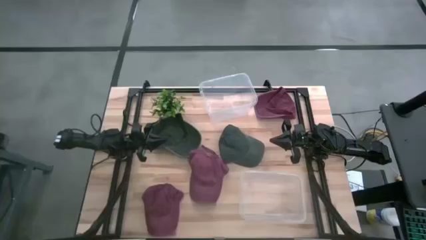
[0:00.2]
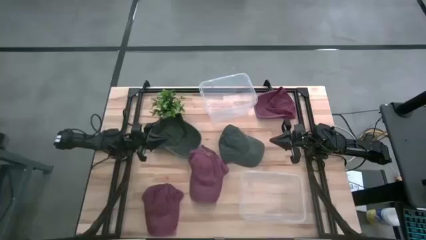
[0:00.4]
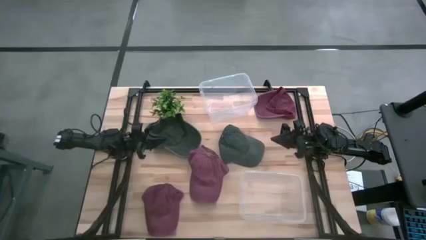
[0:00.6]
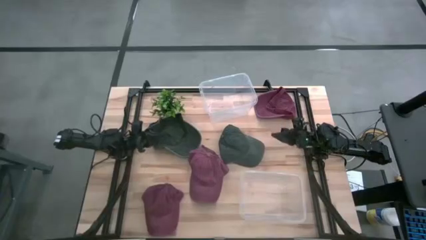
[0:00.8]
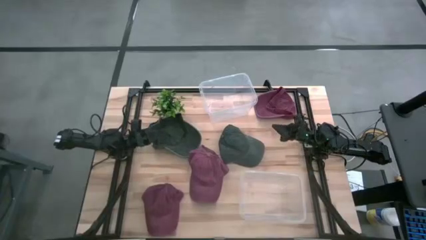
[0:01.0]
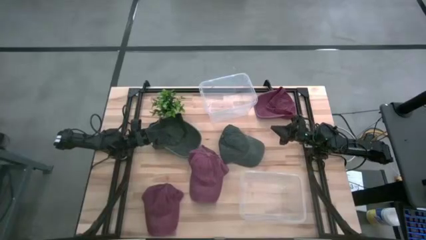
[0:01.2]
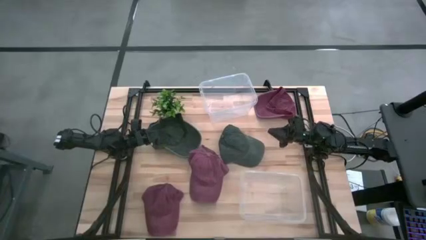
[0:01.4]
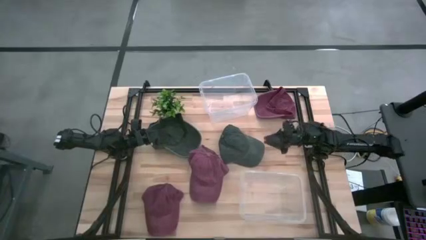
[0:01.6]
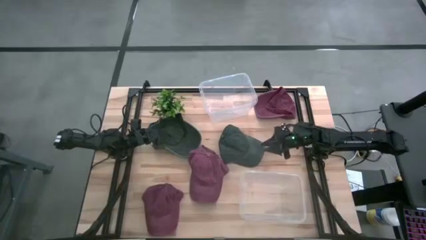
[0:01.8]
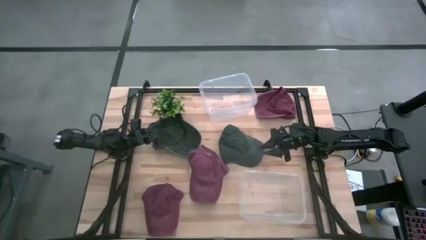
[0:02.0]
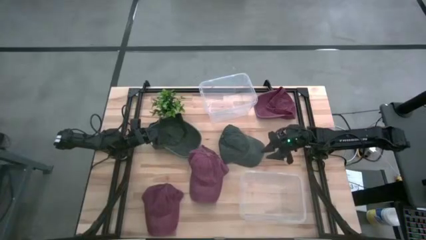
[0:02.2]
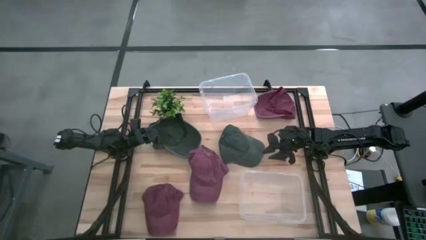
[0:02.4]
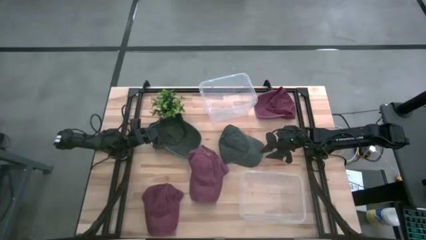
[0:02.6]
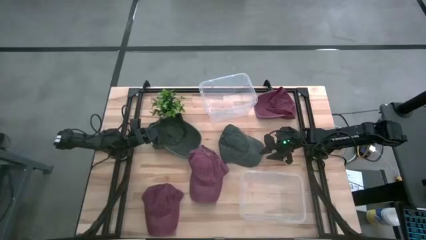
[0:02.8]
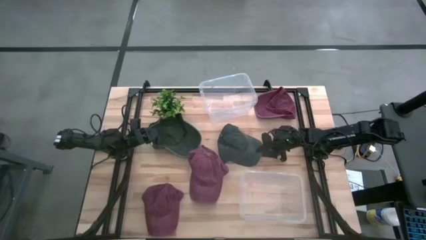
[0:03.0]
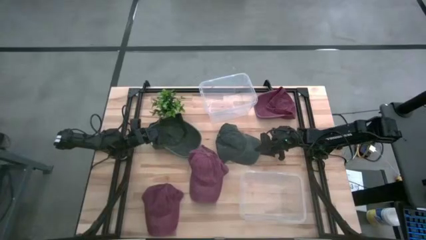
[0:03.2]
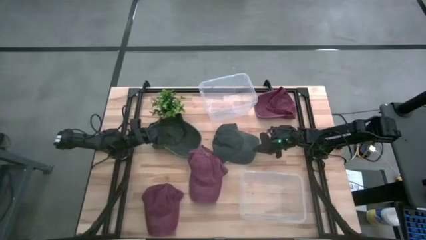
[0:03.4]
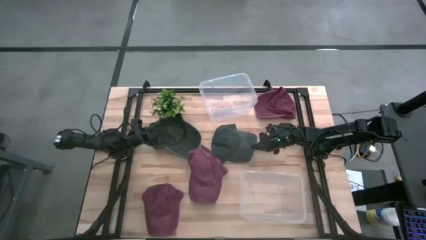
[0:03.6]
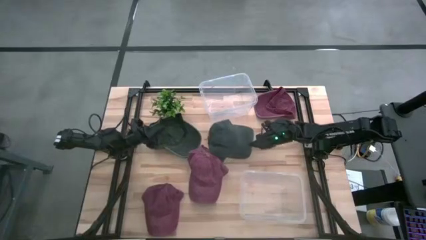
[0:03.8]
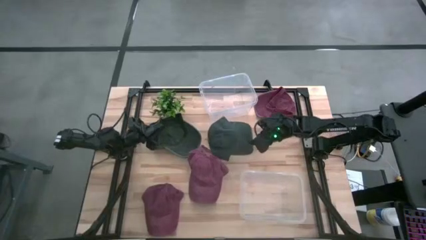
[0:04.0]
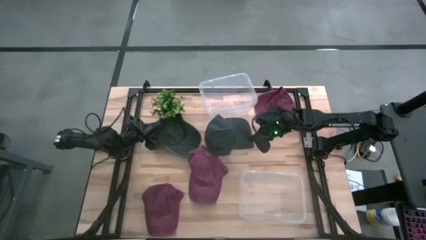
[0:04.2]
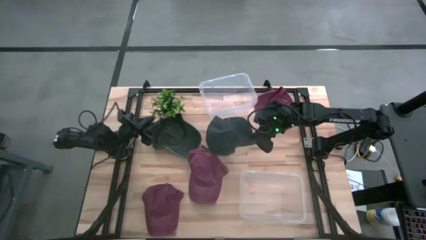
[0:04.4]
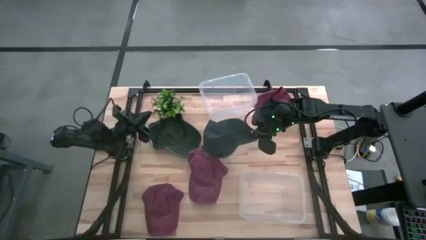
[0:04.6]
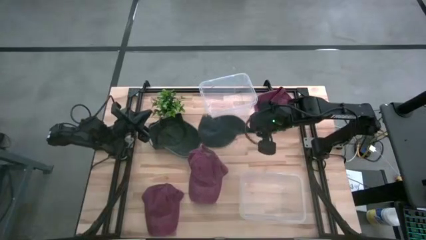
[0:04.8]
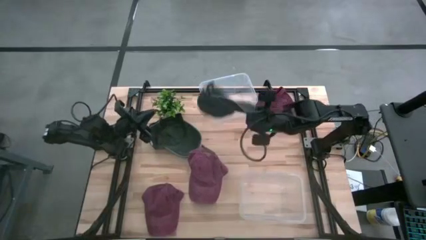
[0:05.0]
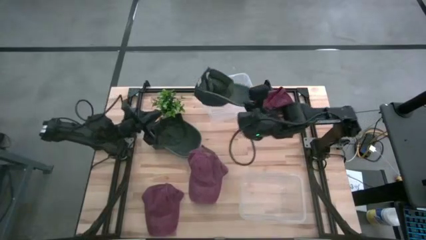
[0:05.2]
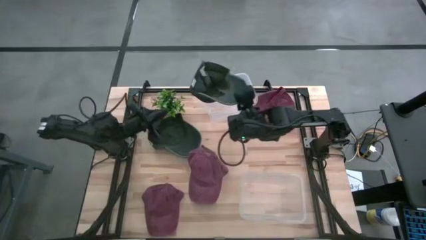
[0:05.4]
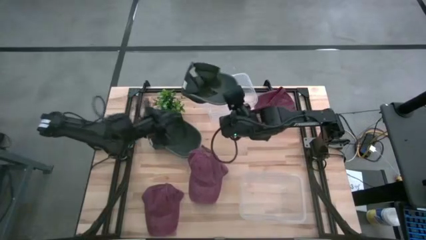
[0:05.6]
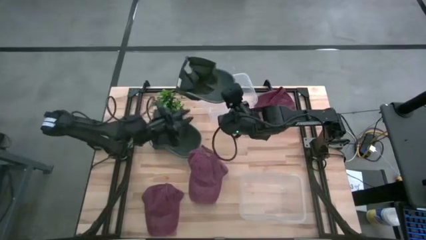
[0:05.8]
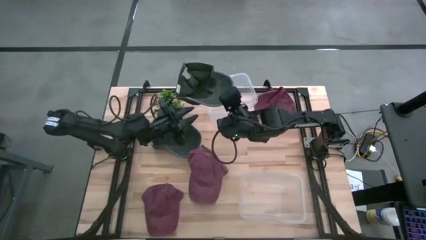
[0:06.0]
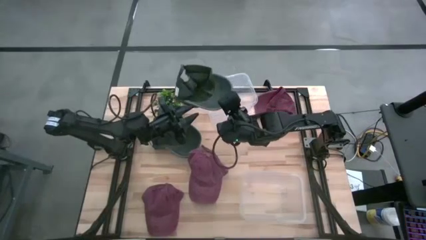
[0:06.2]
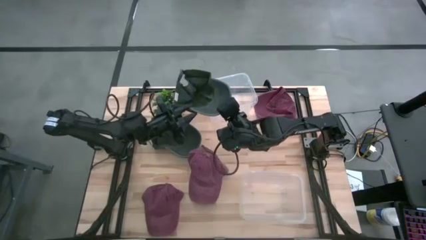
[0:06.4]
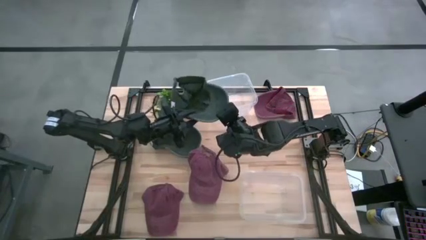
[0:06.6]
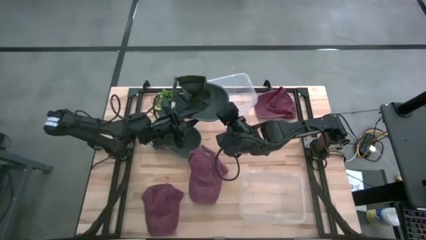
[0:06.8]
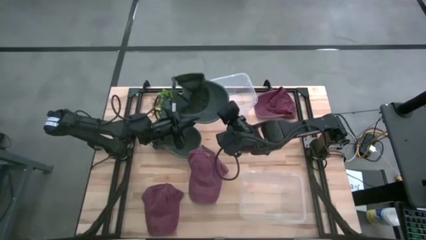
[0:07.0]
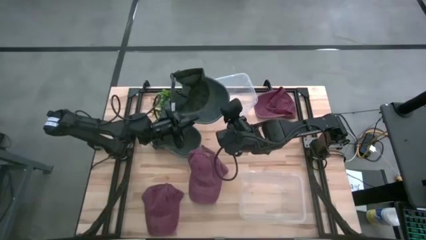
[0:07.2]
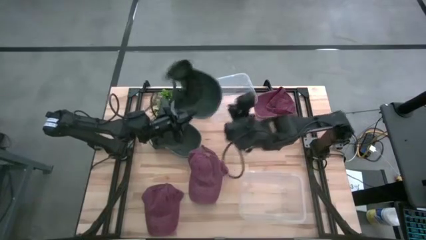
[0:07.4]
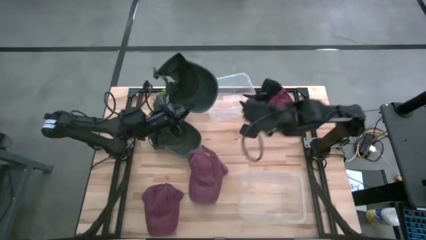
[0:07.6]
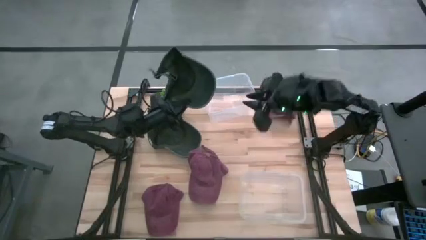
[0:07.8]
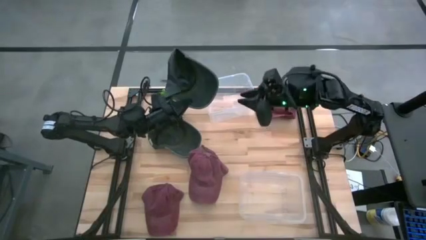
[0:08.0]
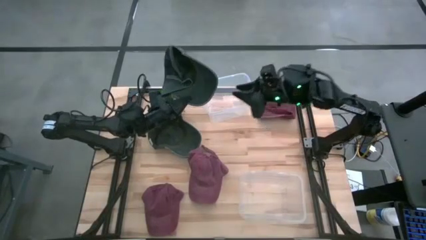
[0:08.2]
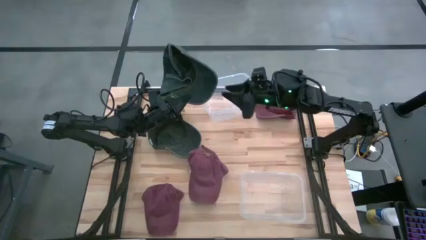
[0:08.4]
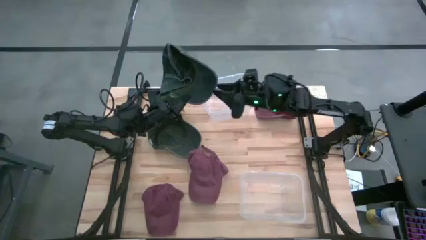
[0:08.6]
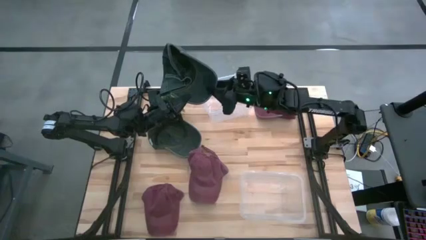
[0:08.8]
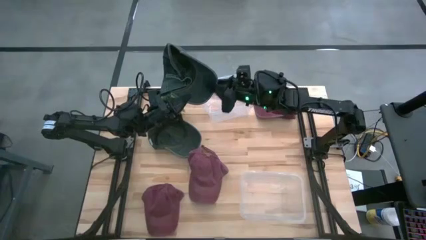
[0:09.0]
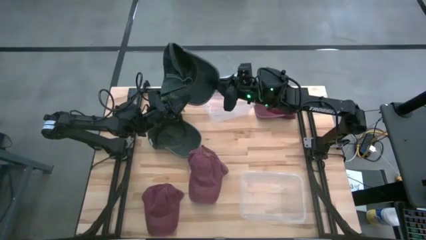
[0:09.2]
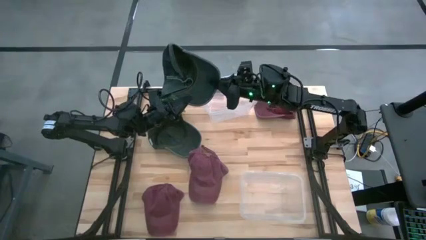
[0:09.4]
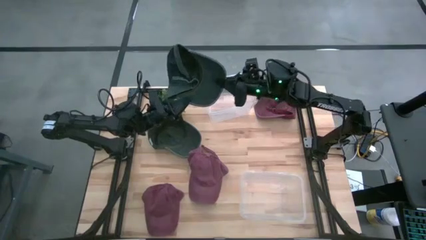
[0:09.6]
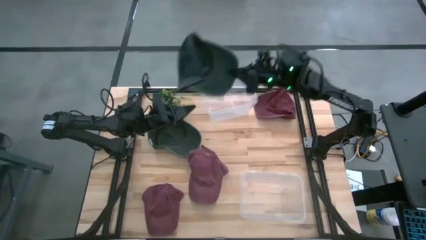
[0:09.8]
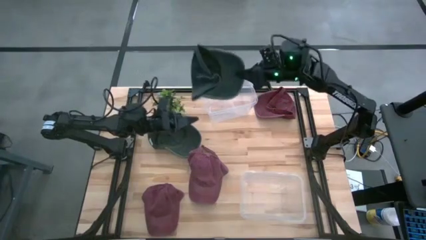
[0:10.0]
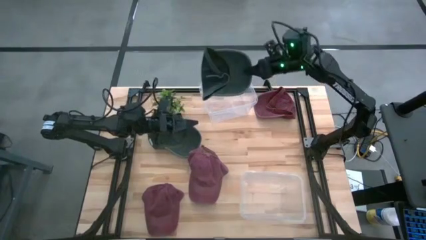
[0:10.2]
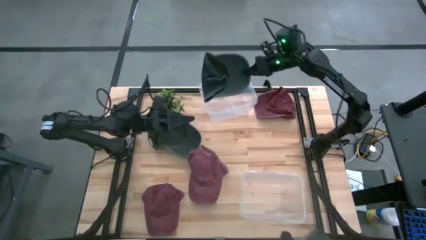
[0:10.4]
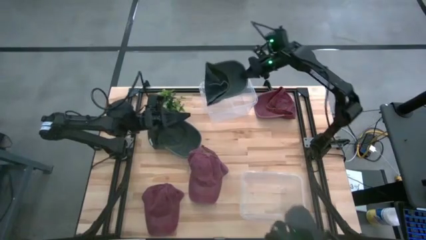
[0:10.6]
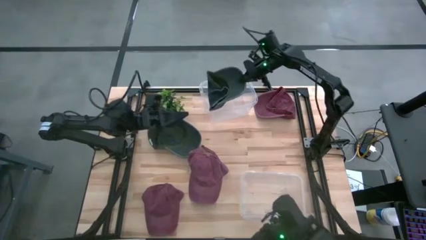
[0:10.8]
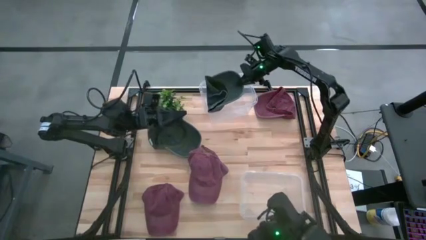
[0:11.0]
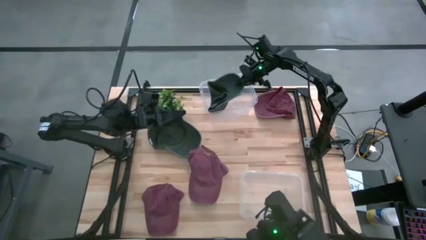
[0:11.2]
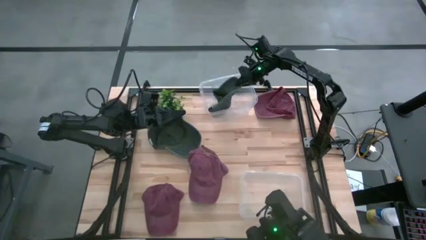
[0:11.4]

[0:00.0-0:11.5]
Task: Pick & Place hat
Put the black cap into the top transparent bin
